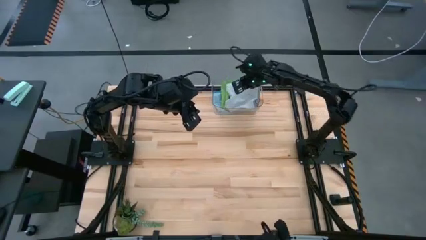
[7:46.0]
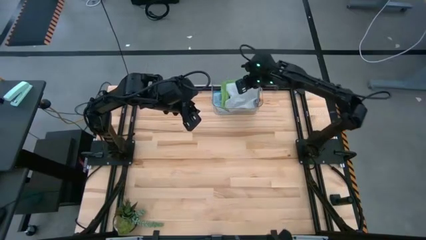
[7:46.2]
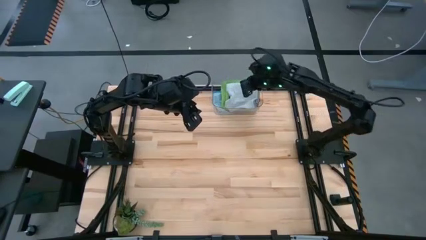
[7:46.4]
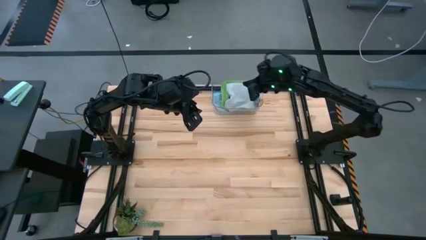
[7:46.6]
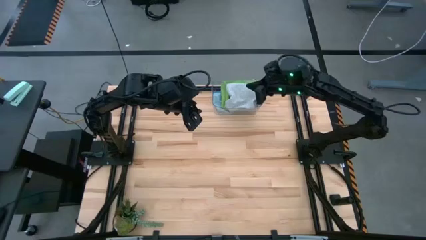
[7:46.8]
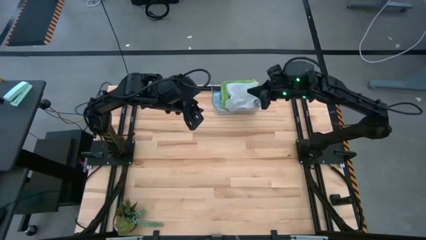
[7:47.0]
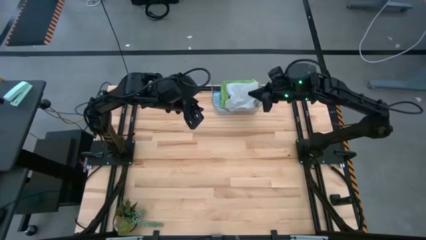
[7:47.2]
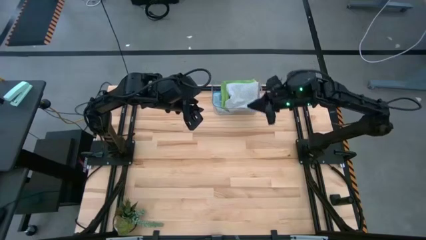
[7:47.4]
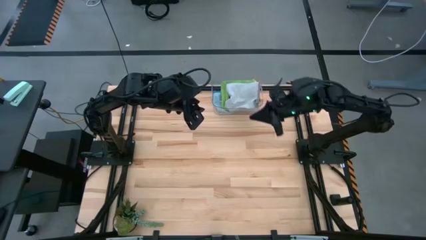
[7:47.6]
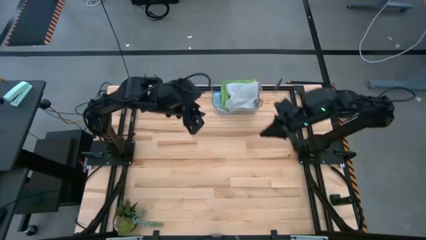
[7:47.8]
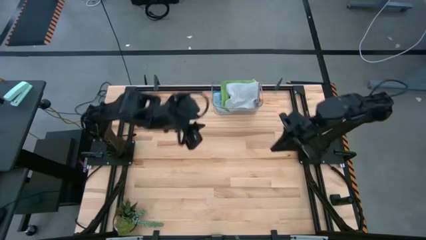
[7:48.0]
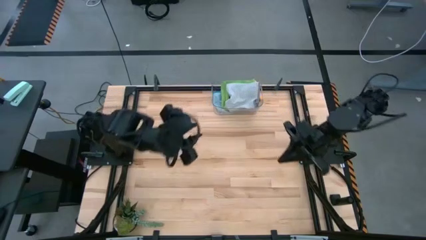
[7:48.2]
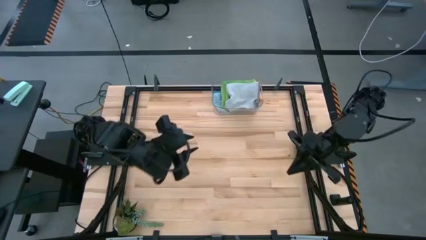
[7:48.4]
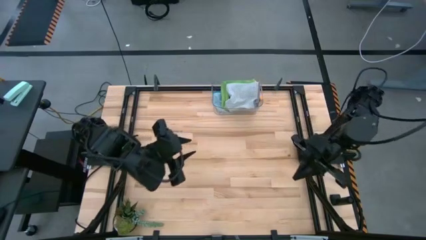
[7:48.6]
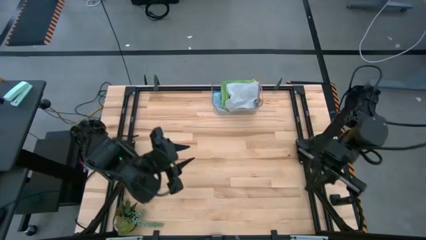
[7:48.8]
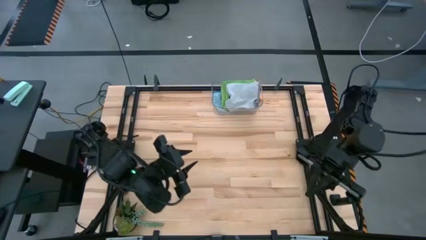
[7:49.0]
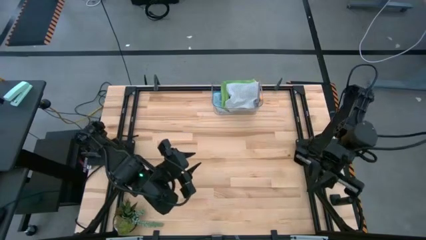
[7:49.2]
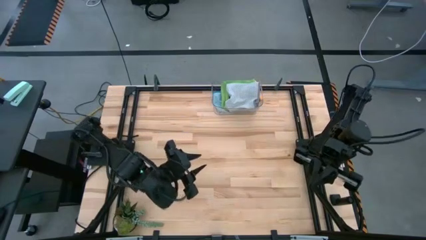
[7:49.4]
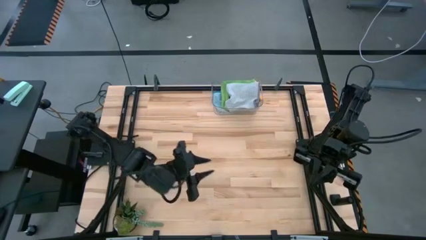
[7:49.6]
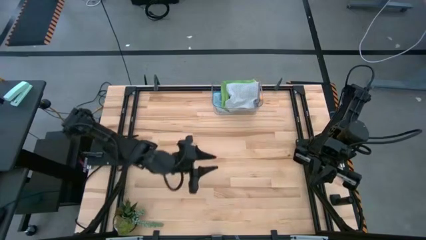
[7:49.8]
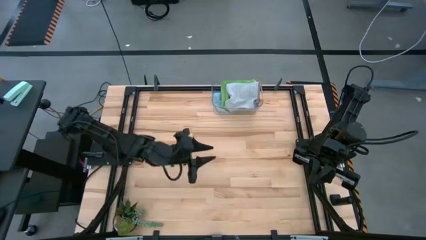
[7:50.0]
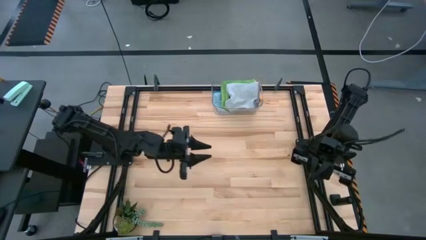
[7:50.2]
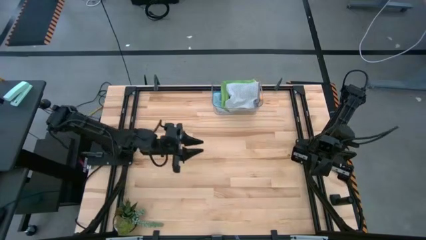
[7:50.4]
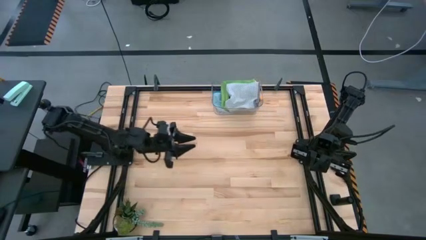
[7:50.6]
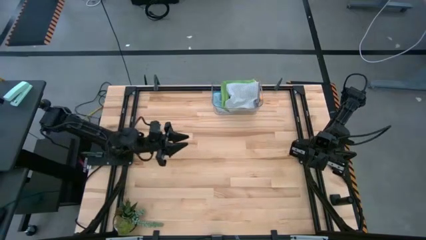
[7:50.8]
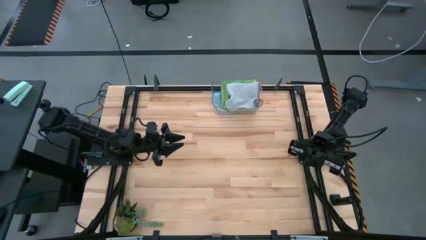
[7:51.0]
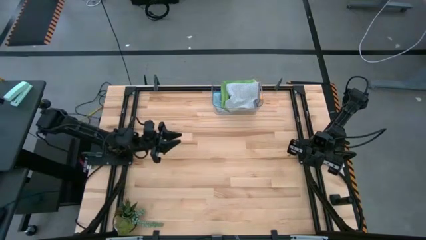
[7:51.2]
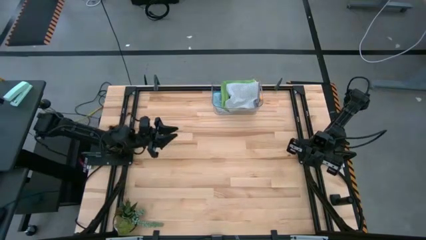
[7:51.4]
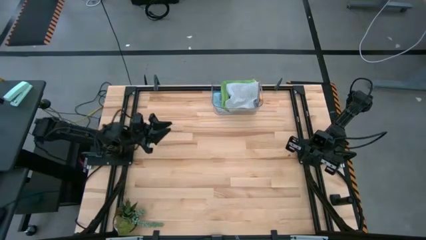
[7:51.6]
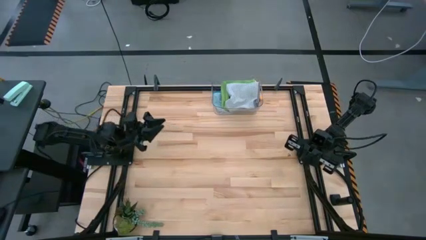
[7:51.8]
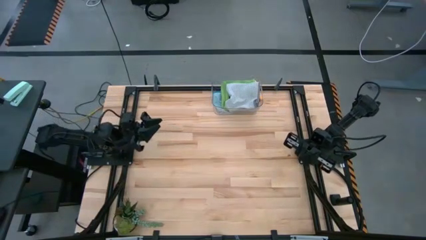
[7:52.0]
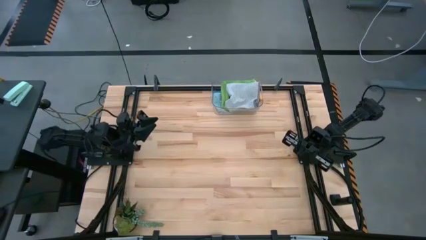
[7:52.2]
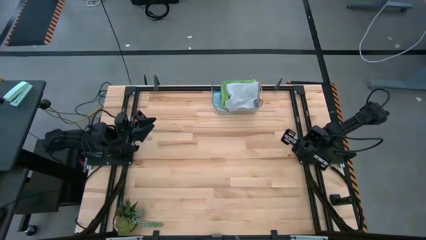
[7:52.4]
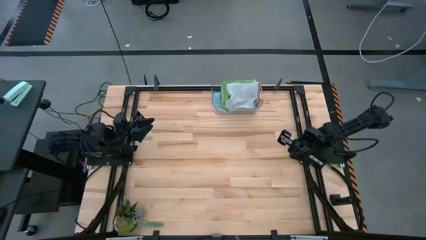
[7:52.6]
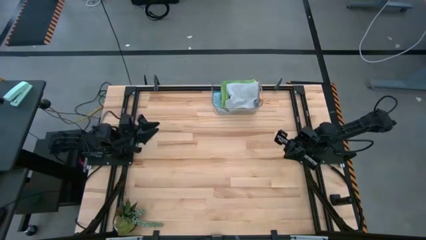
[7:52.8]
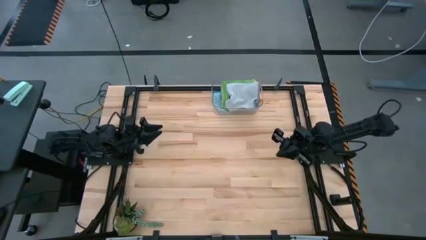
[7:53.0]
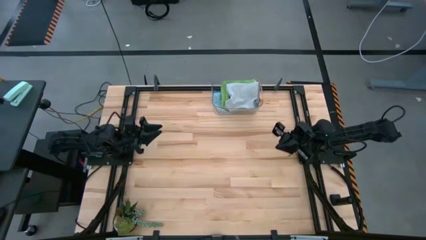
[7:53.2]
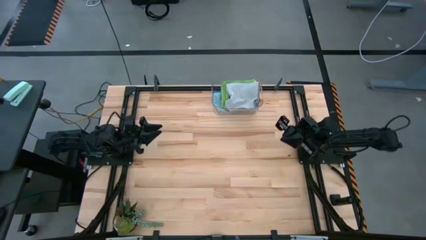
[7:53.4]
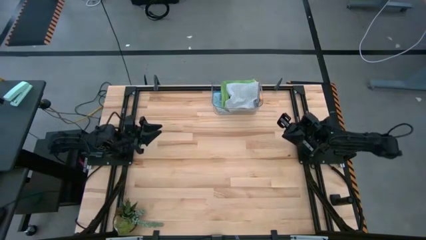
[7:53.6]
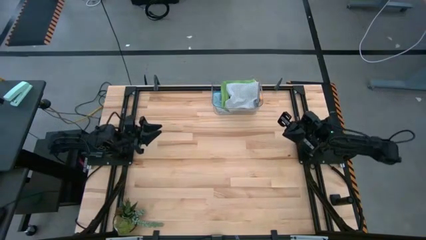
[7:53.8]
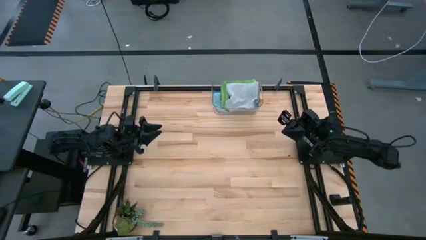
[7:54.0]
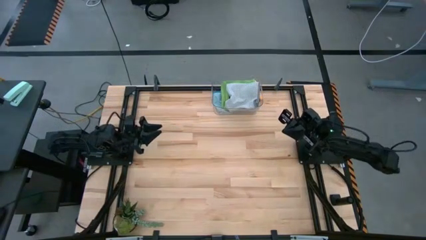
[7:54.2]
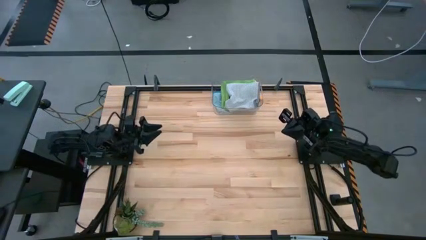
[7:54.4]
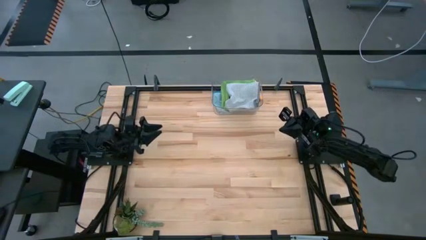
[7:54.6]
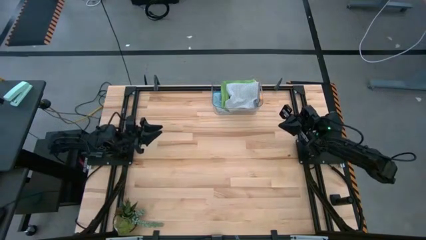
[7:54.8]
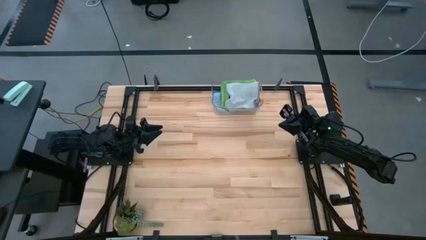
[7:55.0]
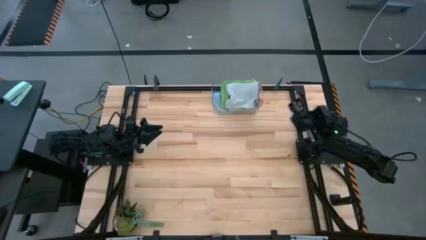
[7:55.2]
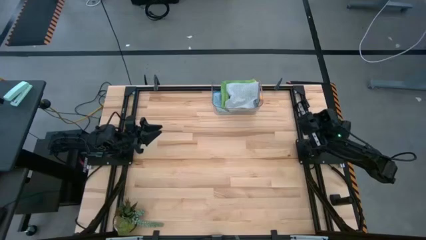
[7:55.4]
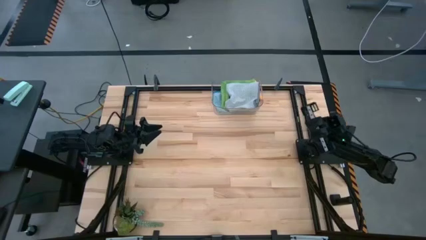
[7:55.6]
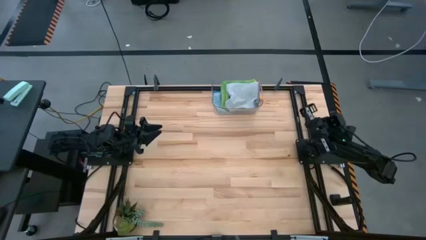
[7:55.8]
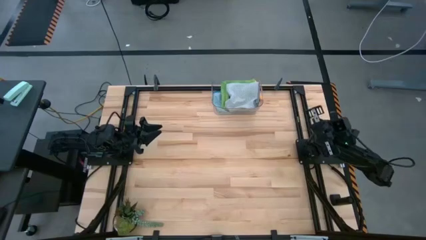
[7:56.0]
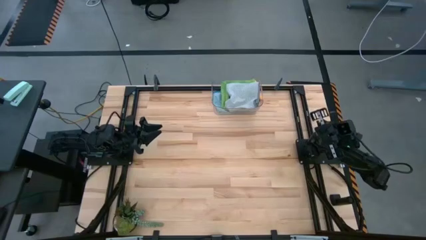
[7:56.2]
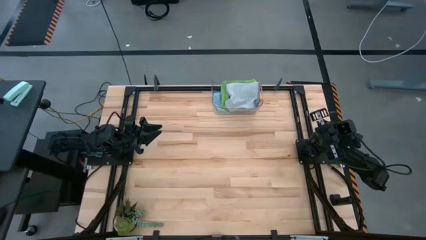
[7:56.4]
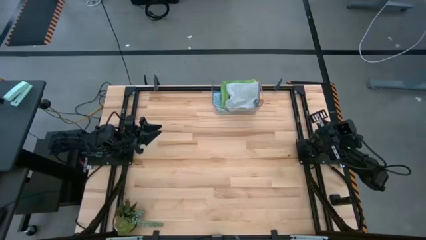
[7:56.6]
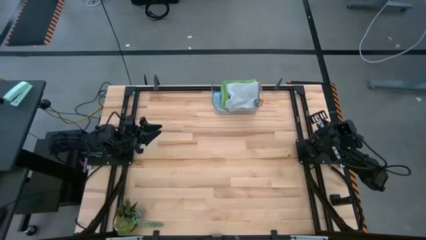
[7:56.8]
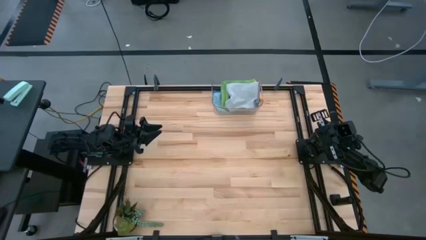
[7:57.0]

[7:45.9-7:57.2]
Task: Fold microfiber towels
Return to Home Position

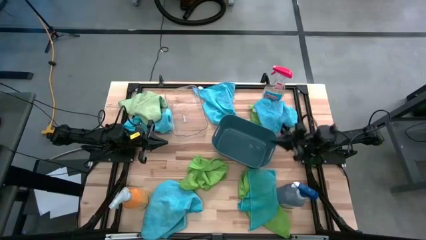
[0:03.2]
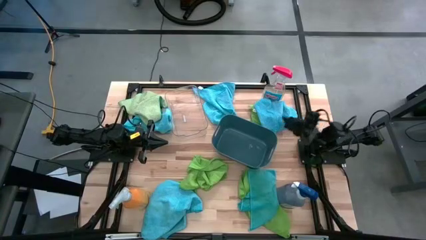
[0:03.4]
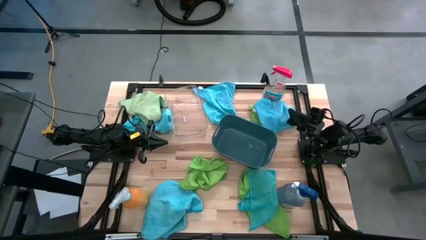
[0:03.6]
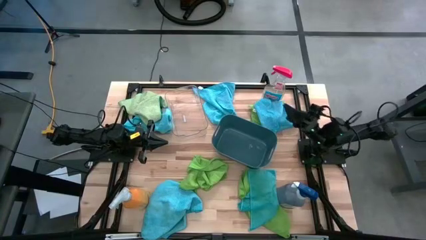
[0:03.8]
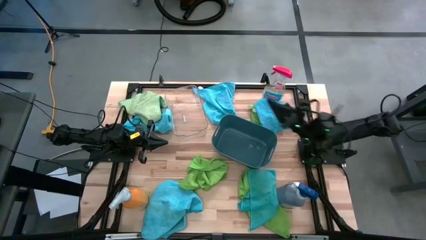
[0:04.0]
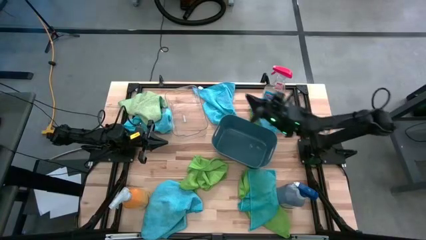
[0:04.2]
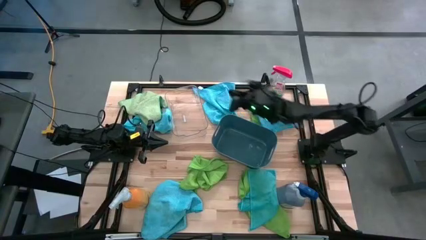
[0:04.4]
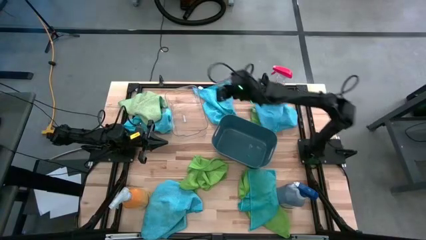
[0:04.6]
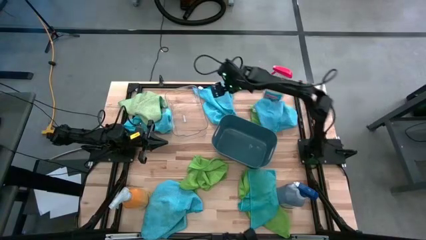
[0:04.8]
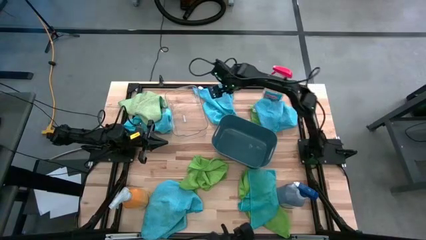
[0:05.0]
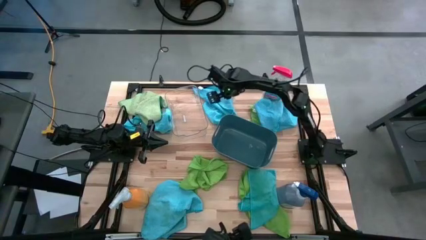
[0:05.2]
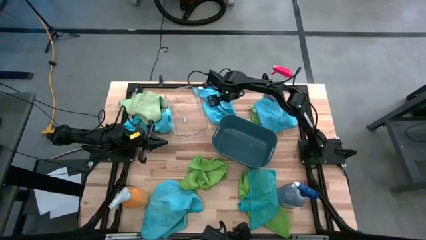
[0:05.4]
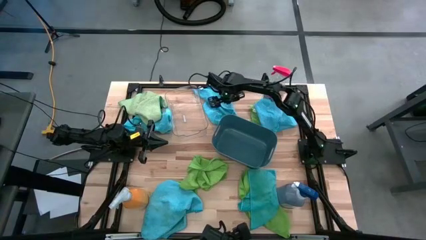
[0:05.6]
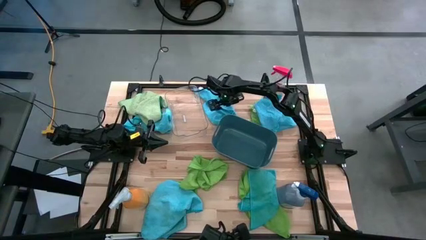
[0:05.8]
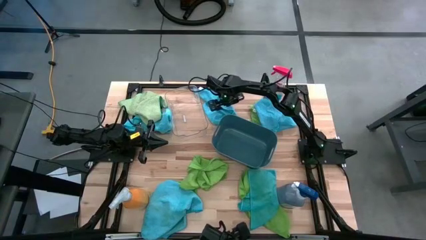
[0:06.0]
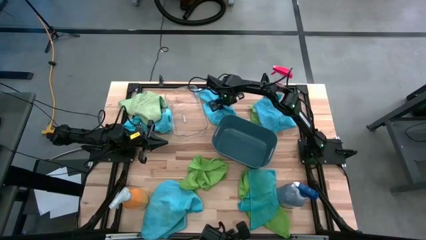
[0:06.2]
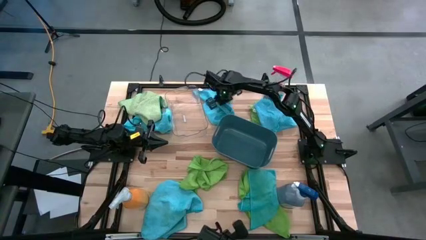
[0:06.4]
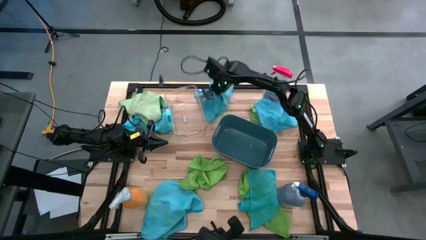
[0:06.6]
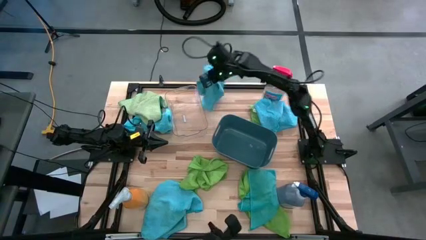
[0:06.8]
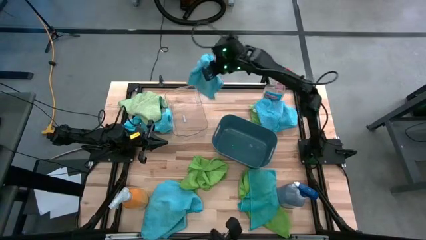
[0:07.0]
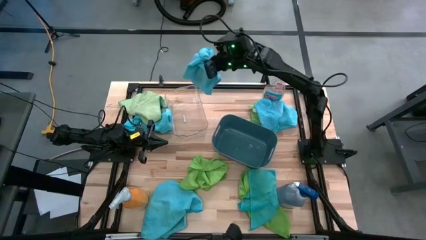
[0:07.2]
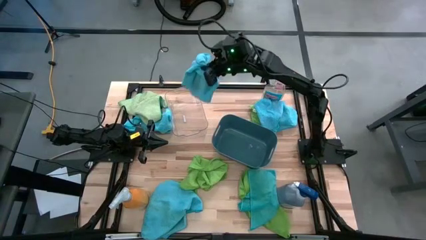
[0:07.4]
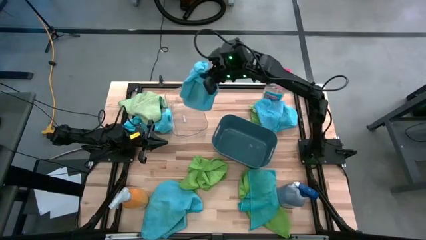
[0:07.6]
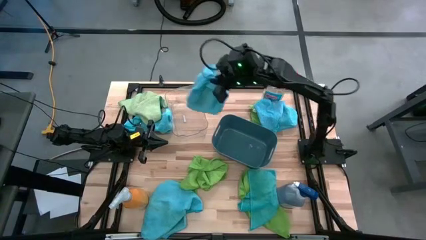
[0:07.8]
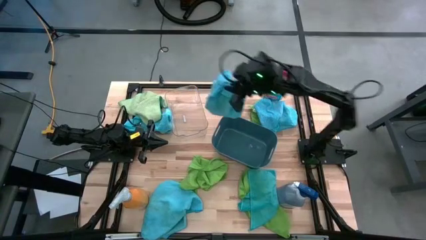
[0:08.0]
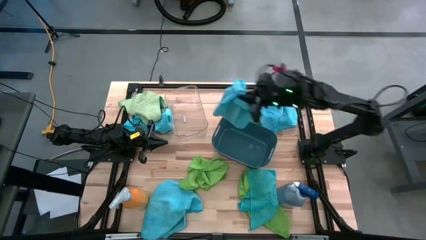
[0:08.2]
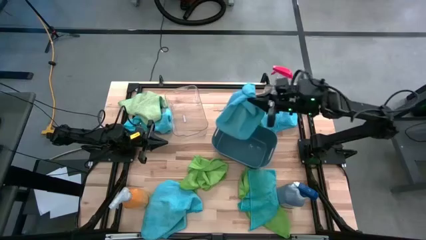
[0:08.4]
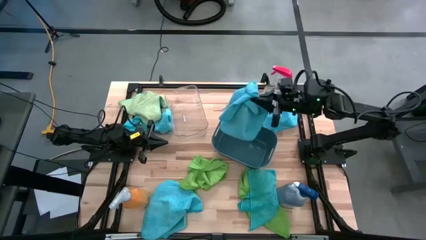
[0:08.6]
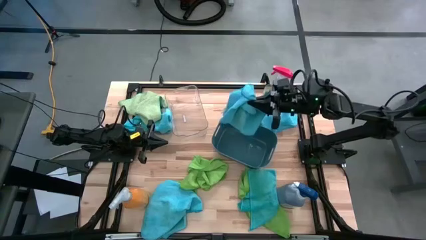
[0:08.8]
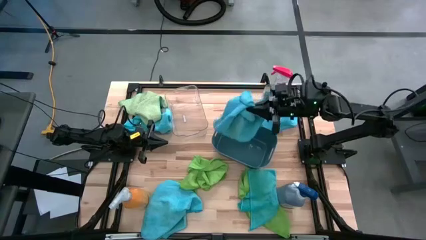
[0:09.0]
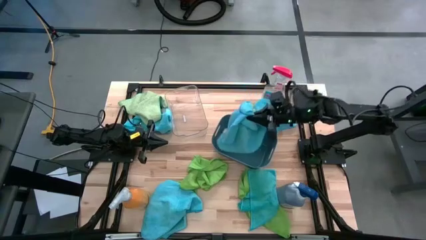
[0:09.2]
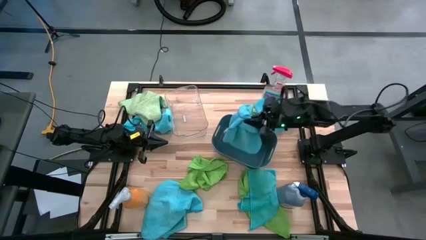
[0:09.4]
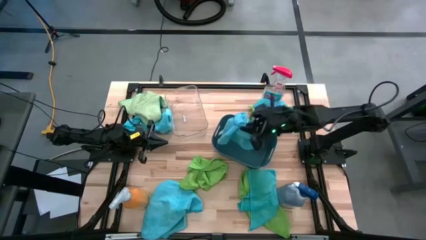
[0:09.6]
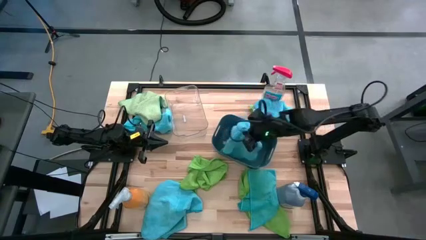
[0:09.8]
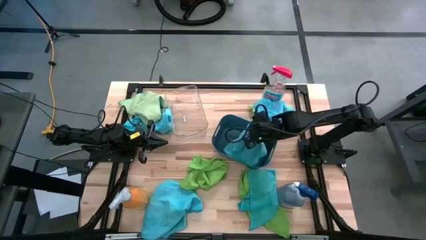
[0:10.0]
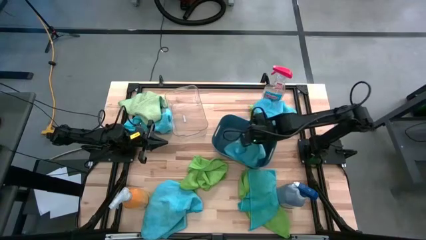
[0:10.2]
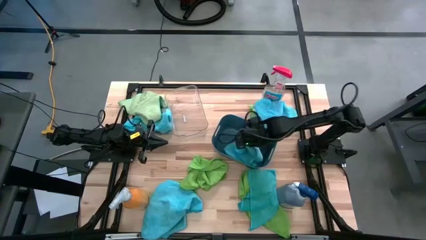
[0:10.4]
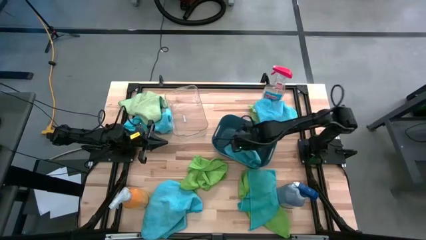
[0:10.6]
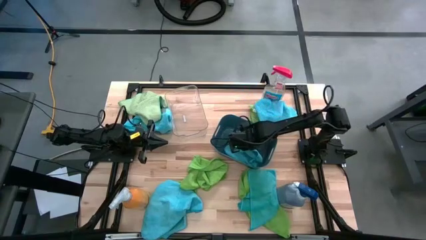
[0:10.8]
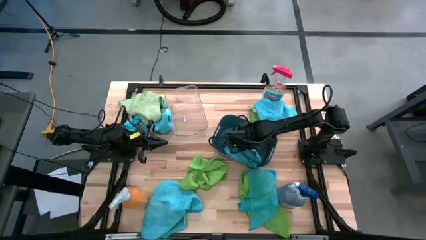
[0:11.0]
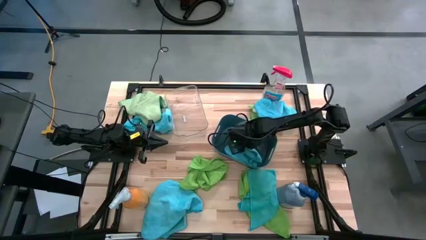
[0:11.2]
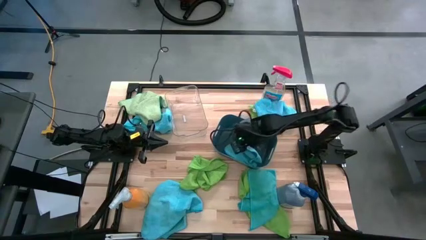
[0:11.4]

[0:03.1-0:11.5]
Task: Sort microfiber towel by color & place in baskets
Put the blue towel into the blue bin
